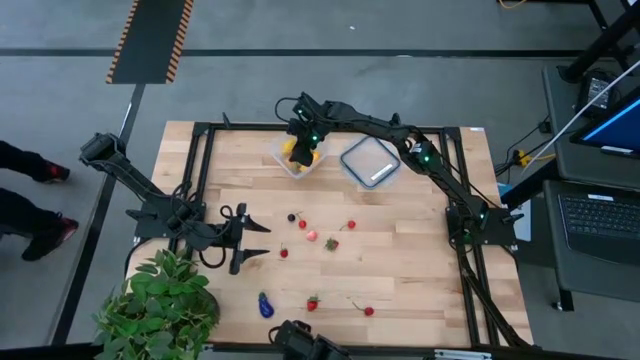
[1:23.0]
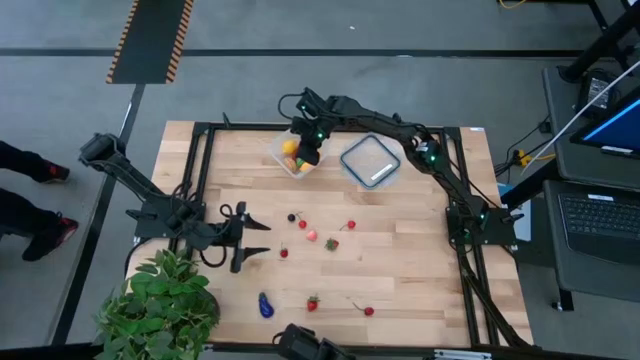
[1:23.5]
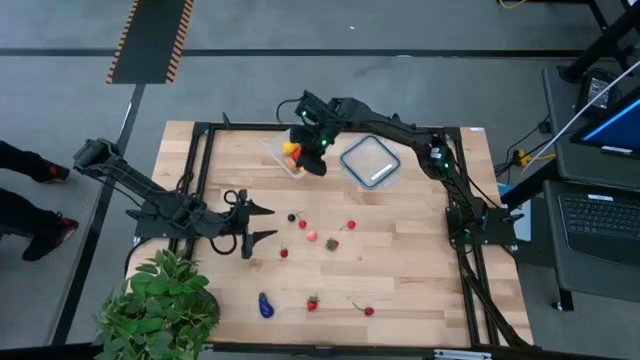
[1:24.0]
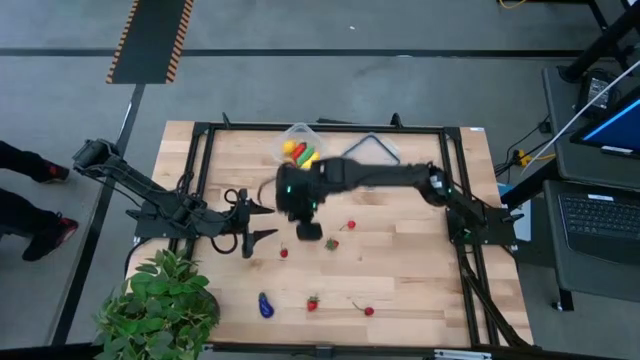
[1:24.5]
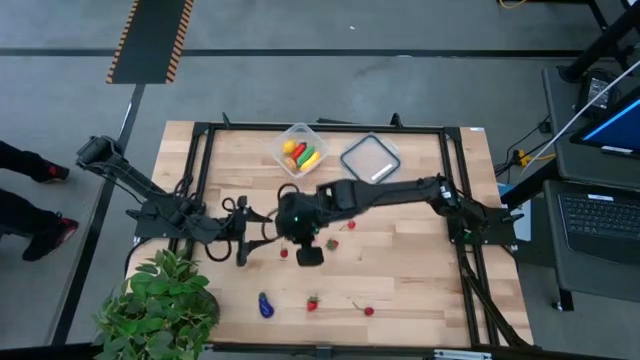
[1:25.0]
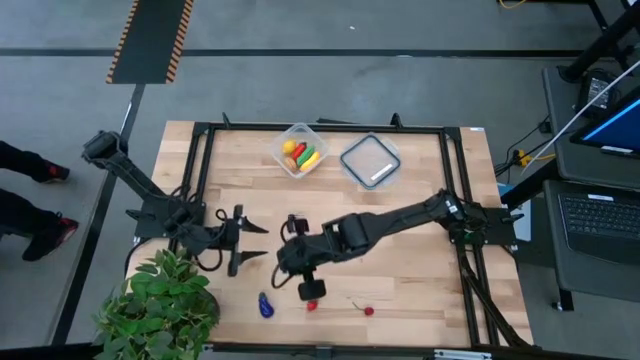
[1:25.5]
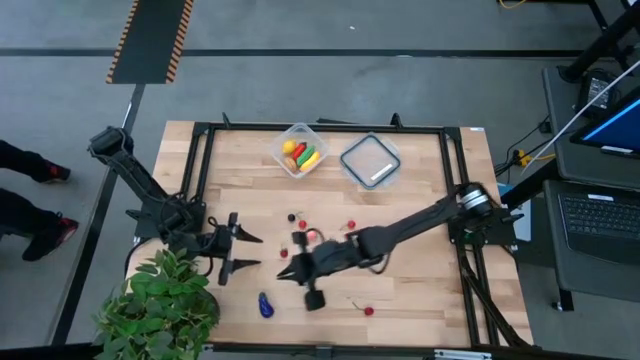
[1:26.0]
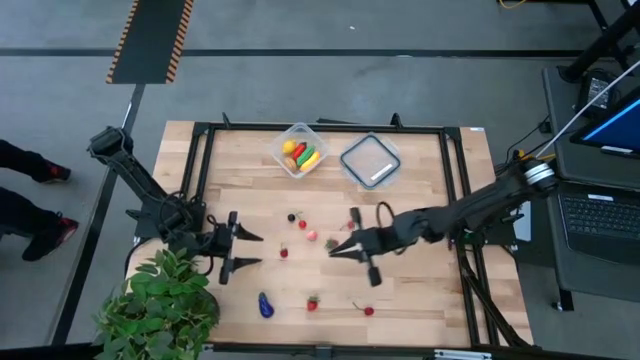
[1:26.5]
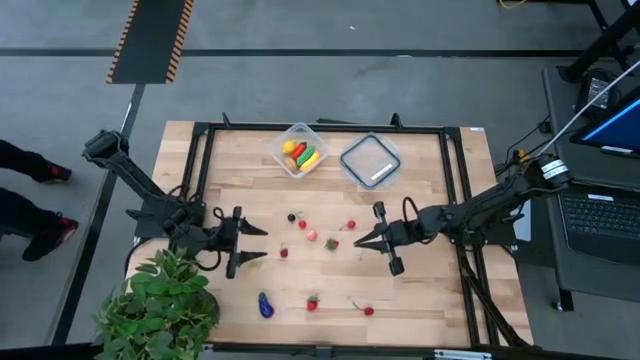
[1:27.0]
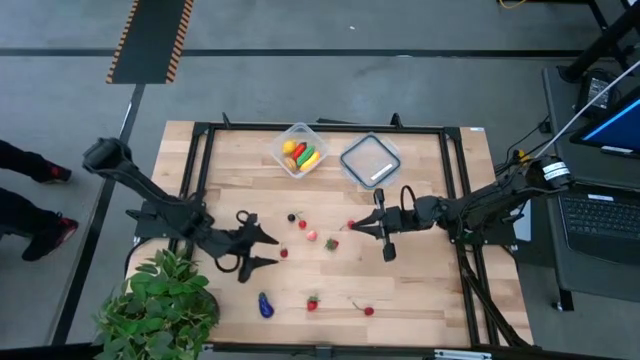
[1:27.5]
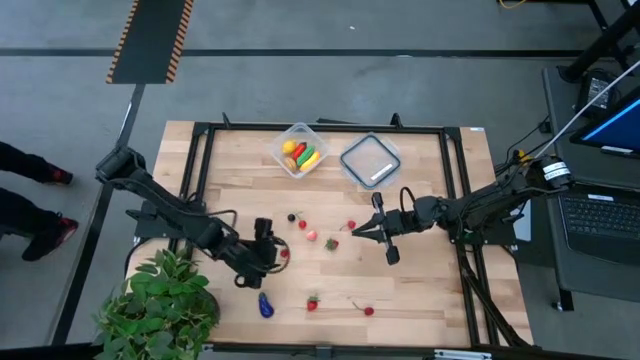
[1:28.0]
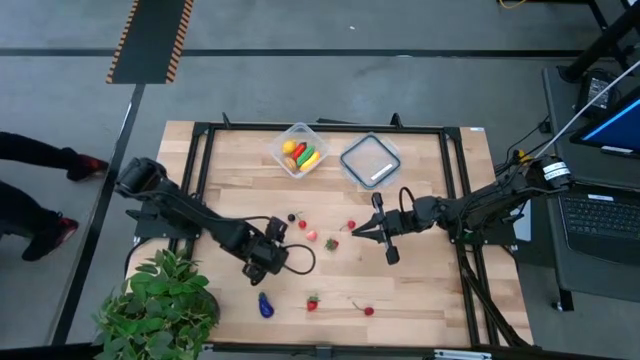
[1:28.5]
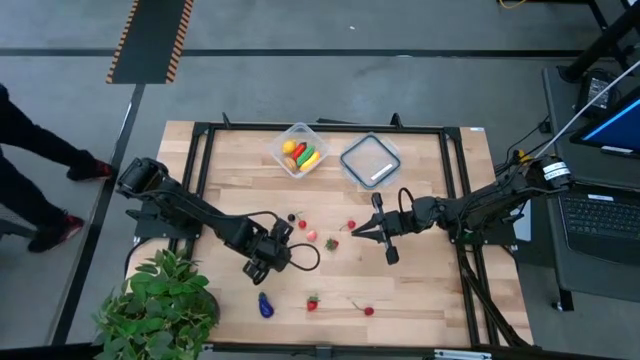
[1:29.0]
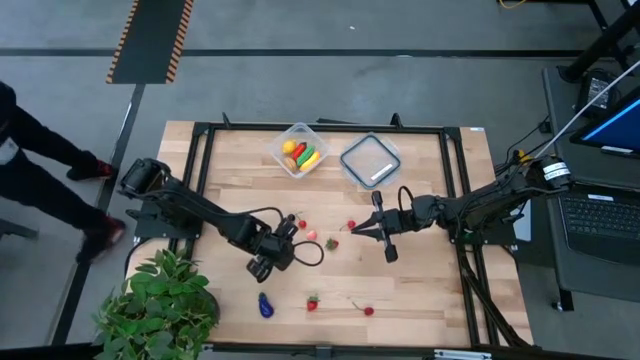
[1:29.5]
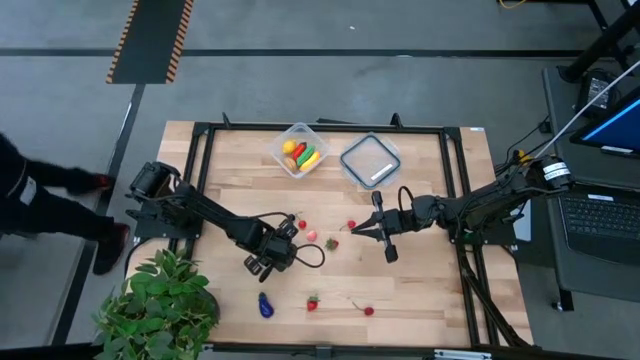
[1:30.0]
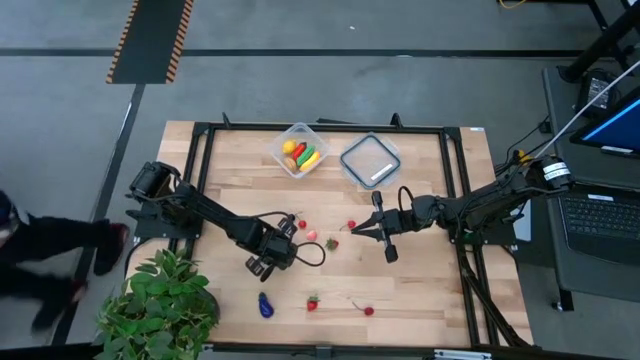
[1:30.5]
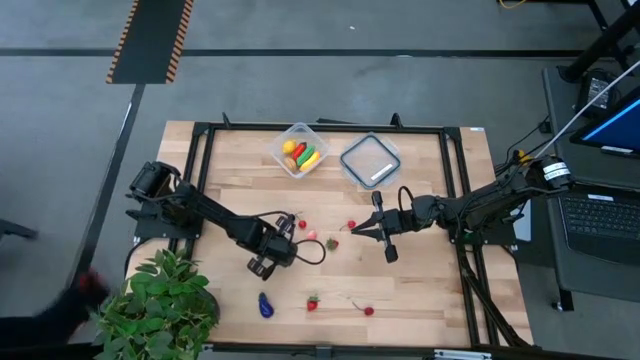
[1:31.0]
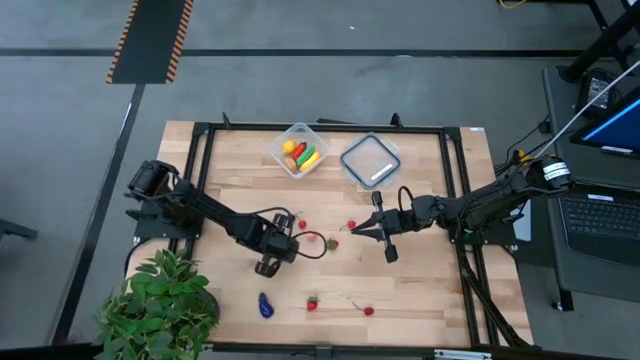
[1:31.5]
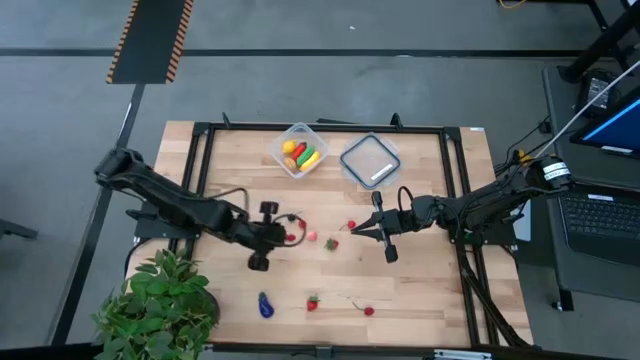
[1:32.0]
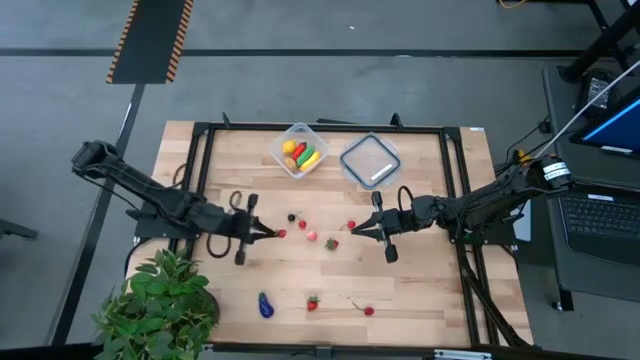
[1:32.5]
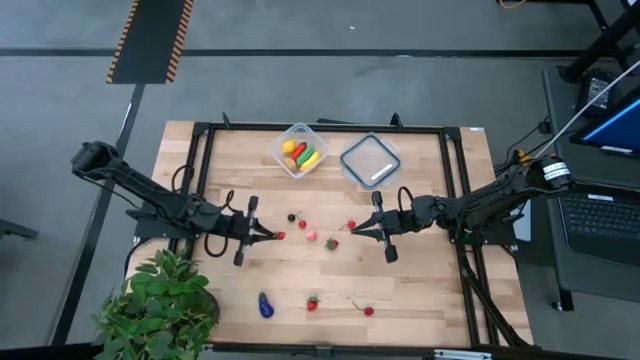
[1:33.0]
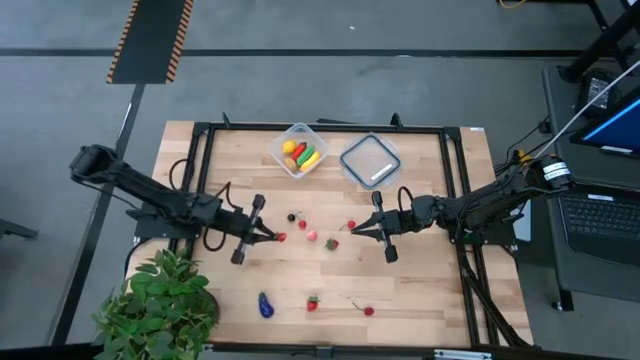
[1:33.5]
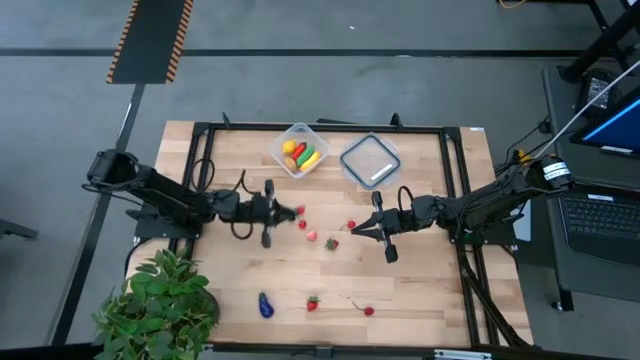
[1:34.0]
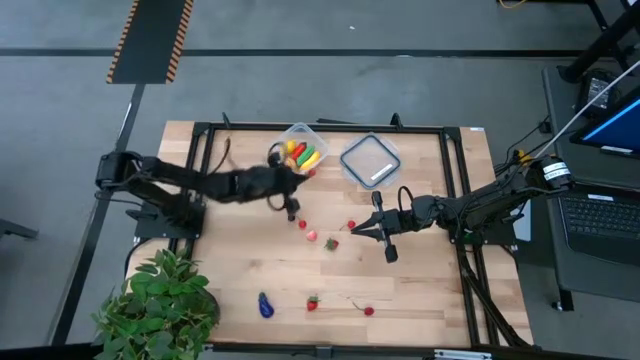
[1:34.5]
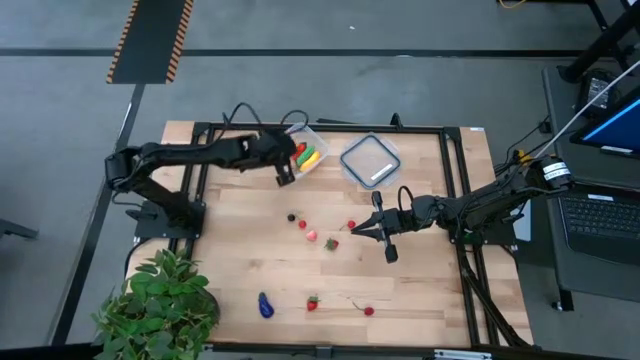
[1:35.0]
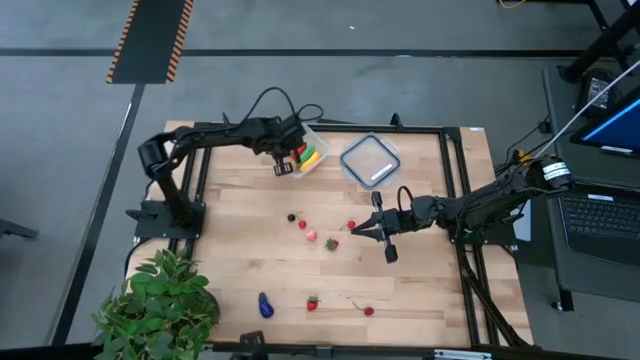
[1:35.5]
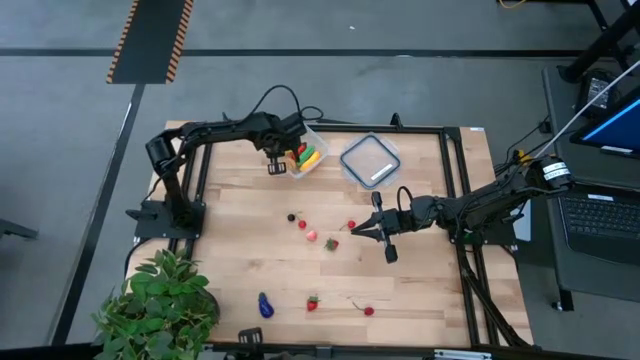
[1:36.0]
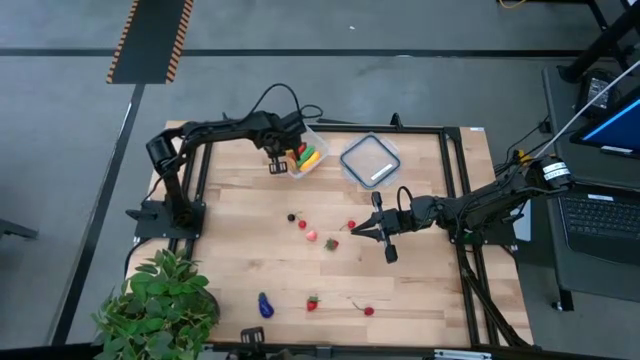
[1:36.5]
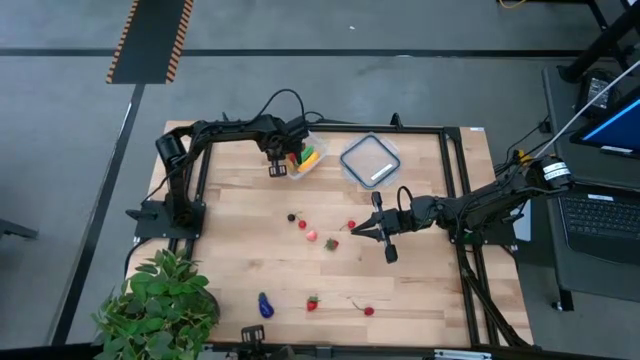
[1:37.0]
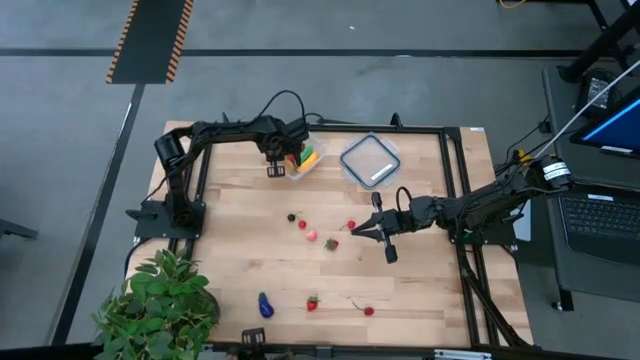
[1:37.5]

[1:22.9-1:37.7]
Task: Pick and placing Produce into tupperware
Put the left strawberry into the transparent container
